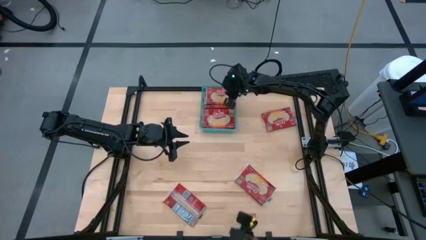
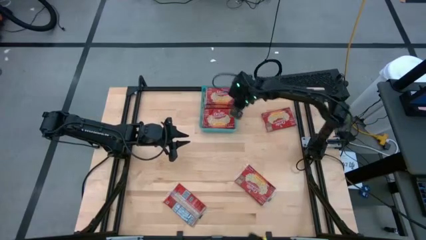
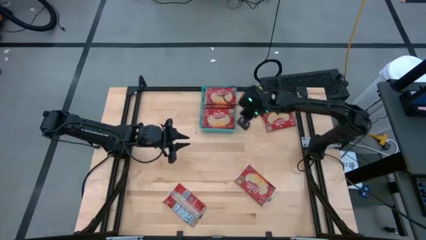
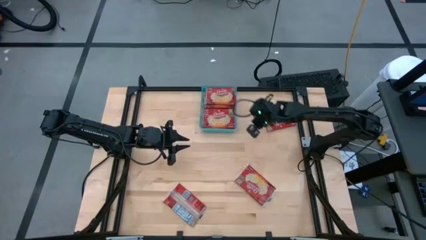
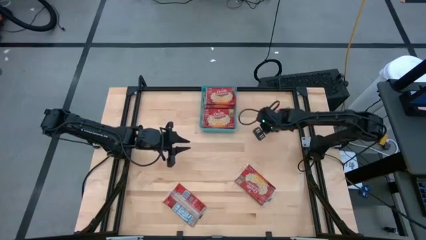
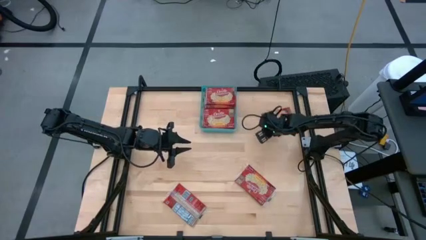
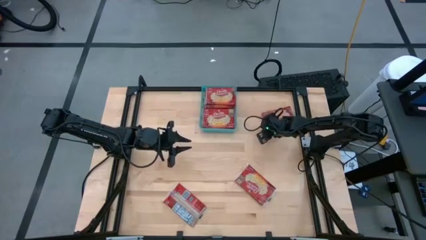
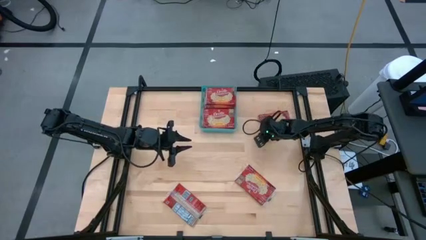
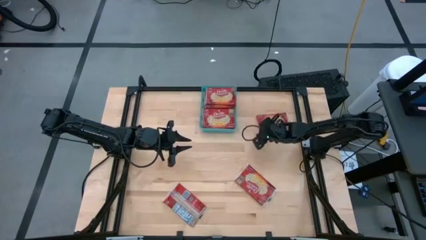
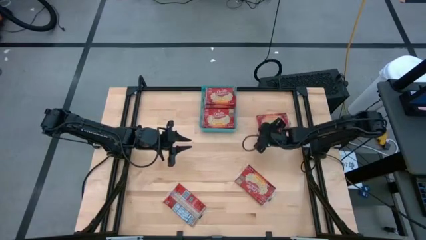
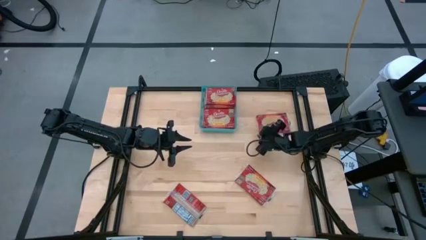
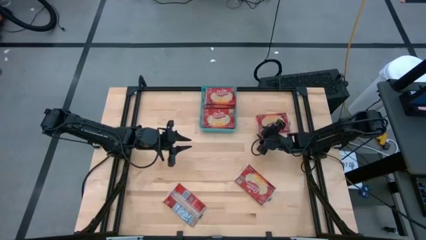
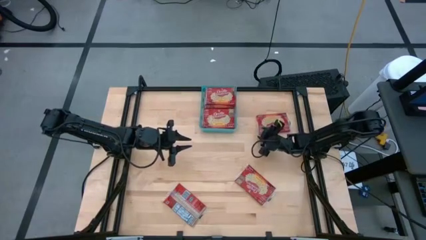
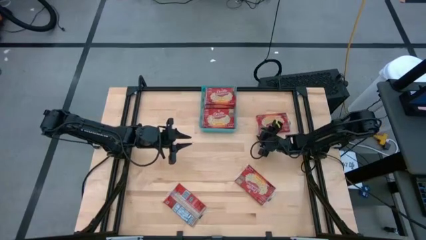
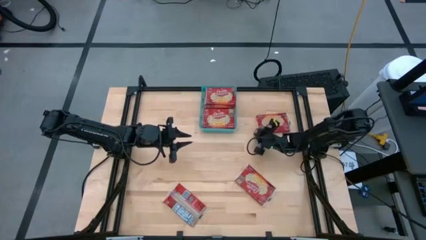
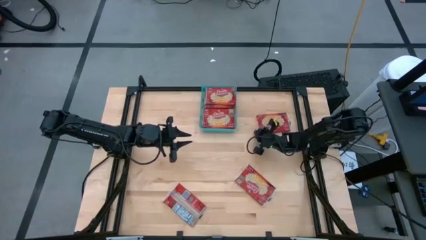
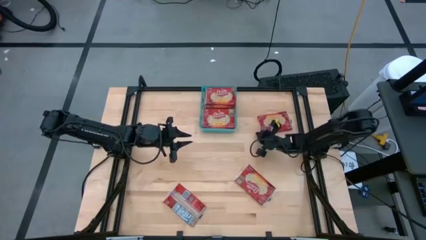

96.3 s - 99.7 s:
Task: Sort popcorn bags into baskets
Put the red popcorn bag into the blue bin

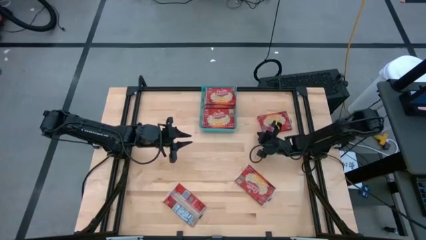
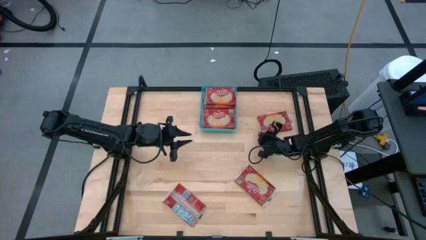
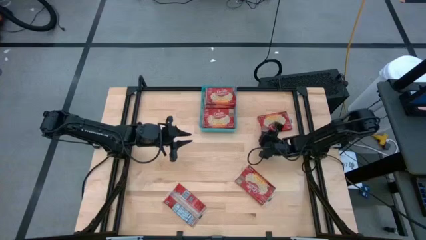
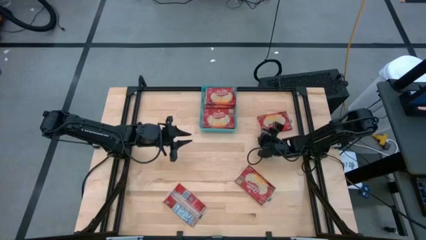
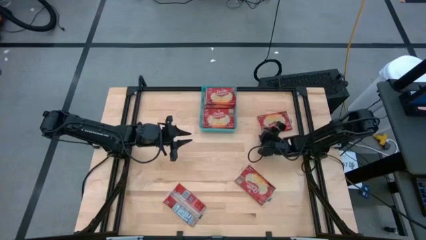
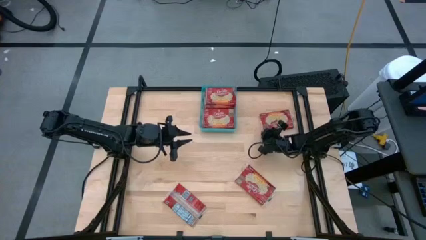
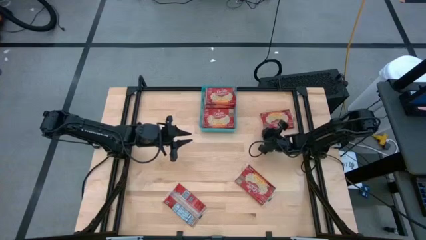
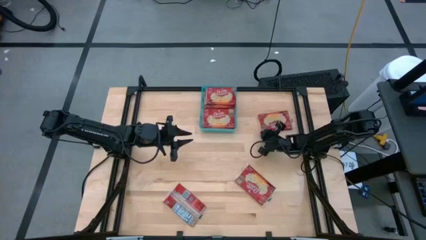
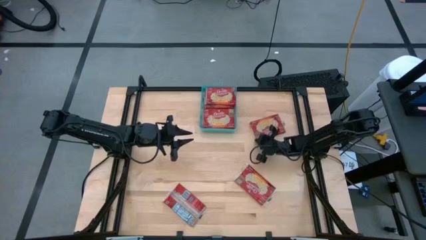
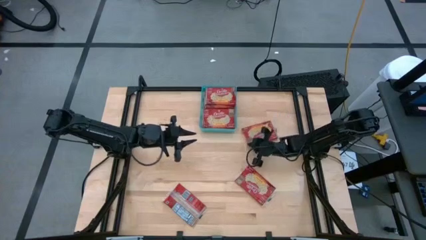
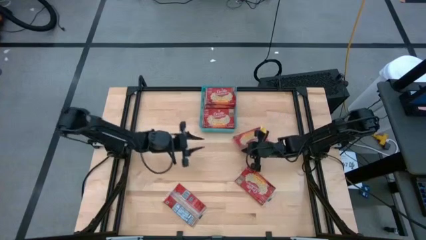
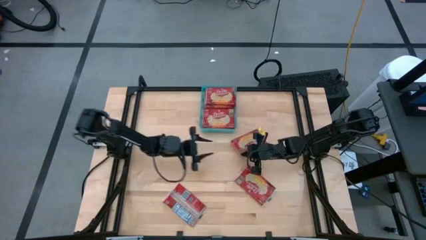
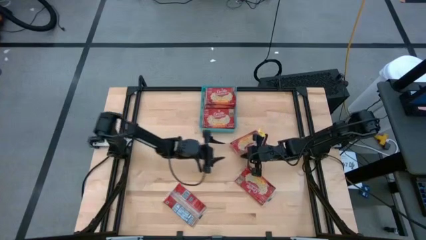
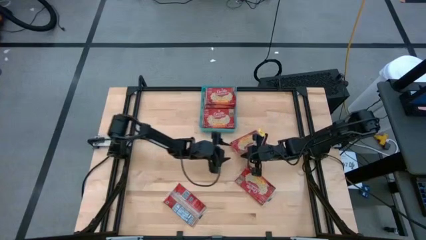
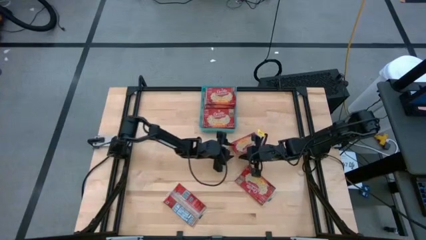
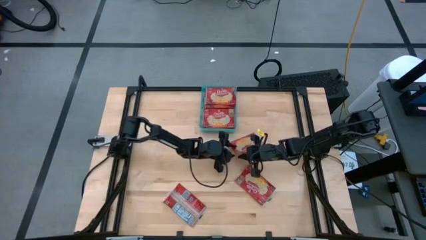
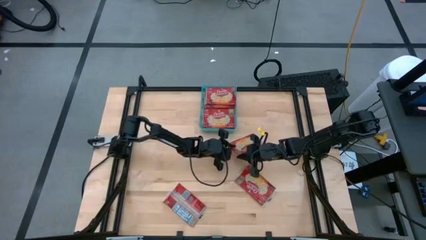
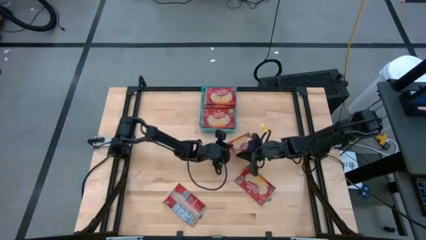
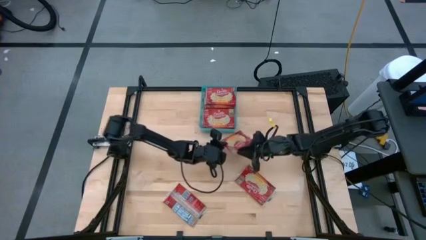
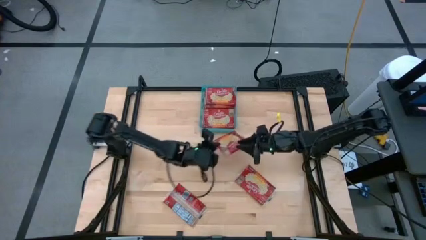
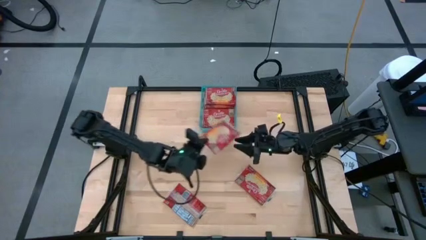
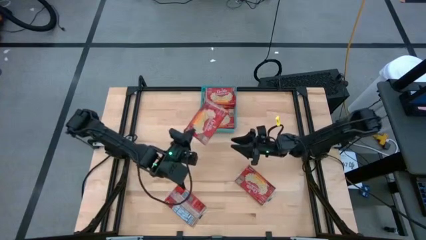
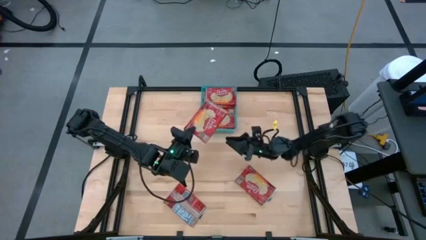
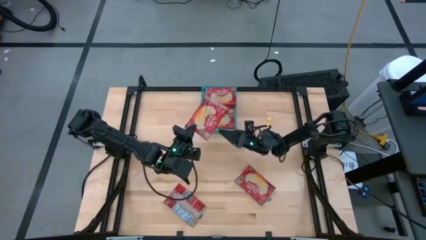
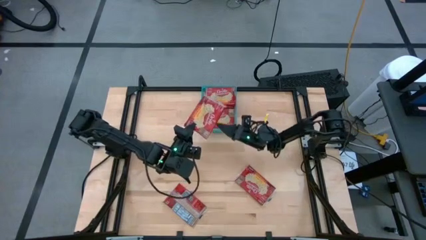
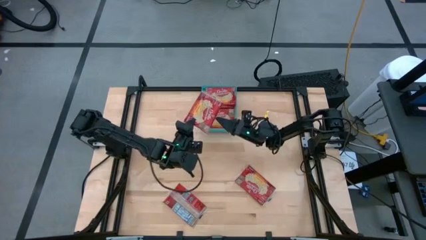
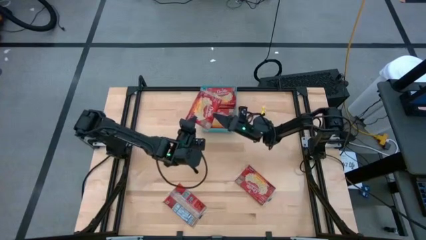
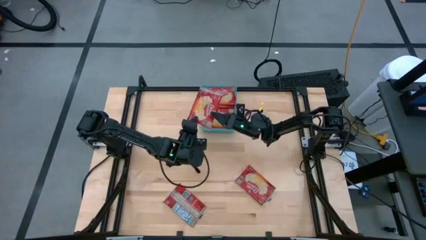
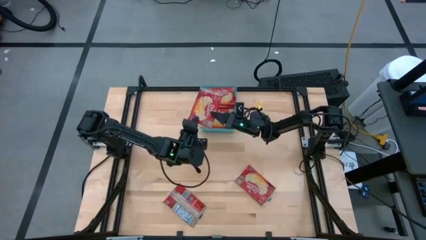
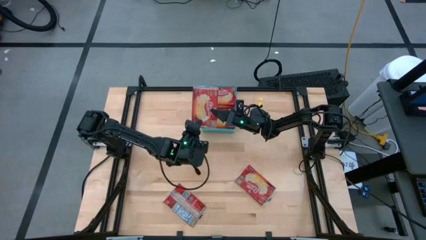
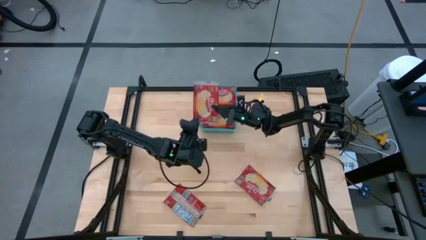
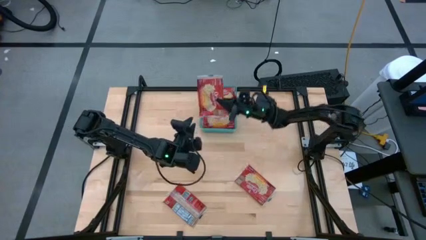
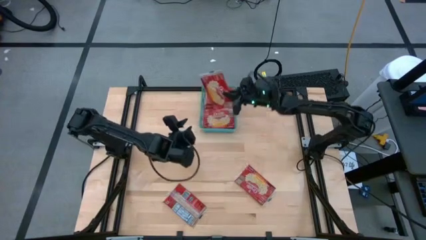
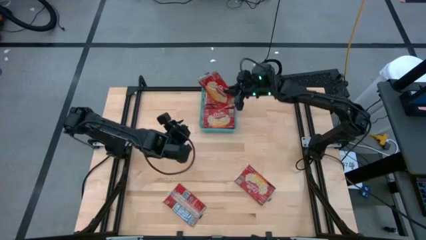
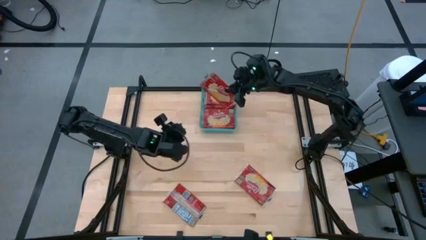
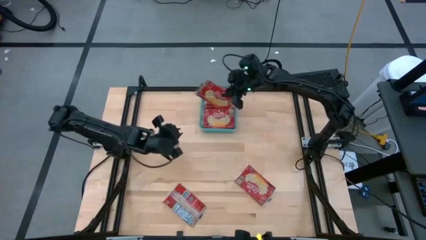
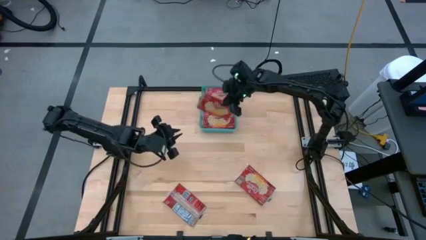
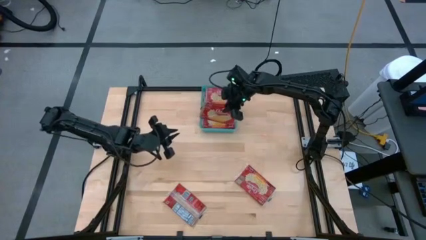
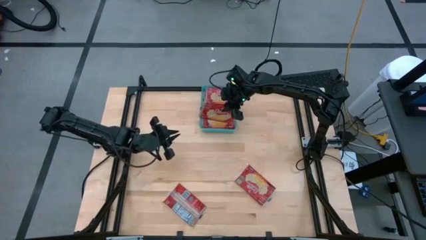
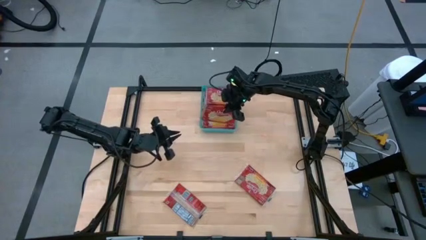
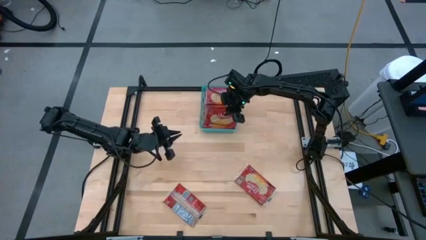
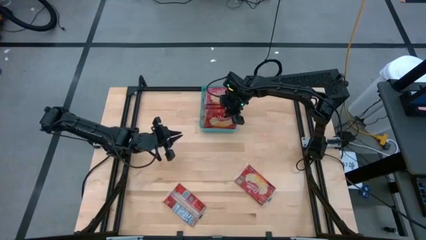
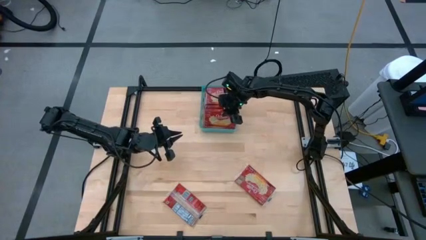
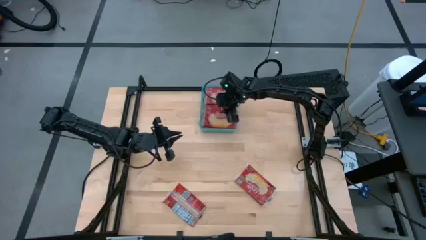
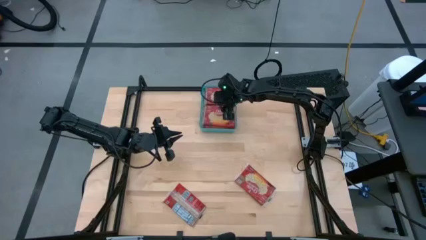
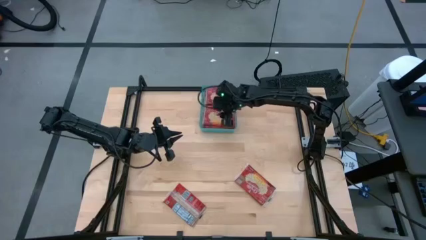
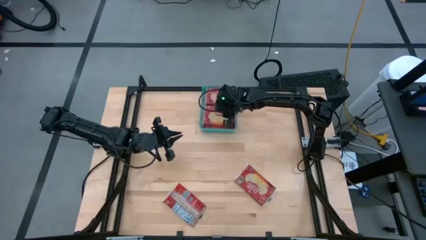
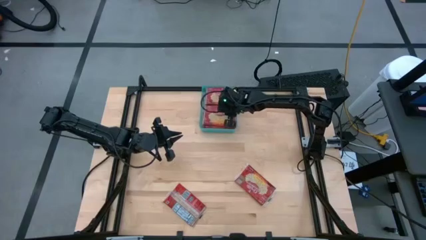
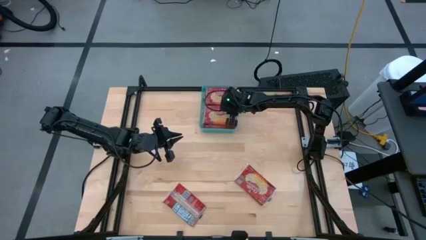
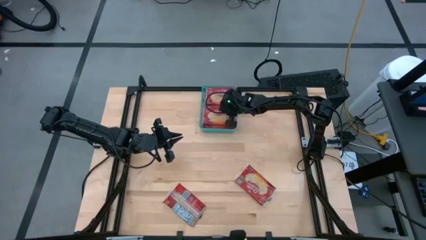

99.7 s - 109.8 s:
Put the red popcorn bag into the blue bin
